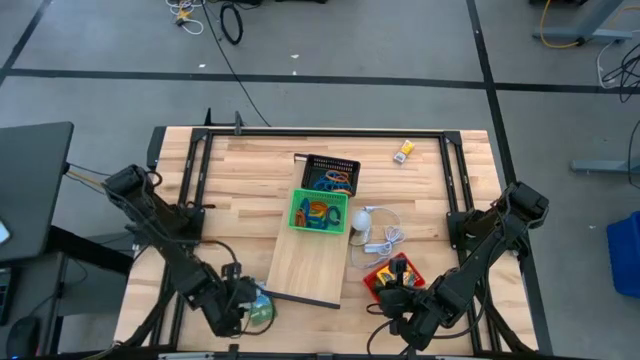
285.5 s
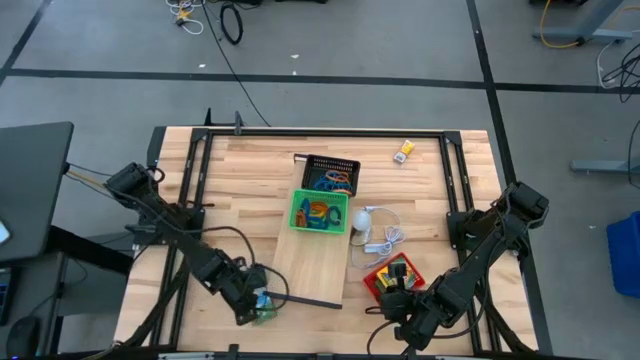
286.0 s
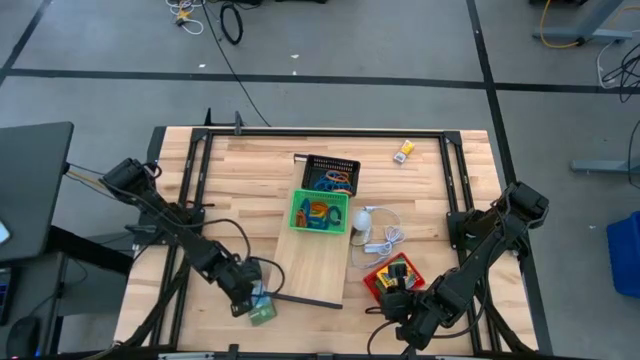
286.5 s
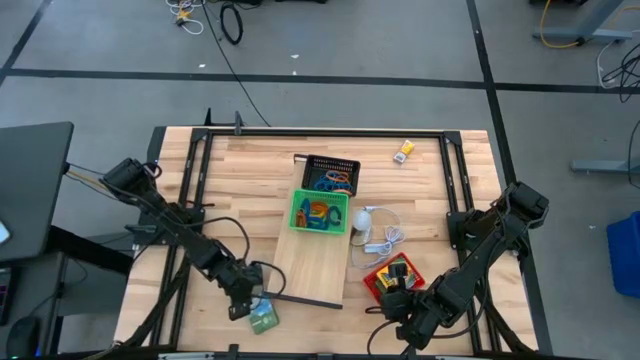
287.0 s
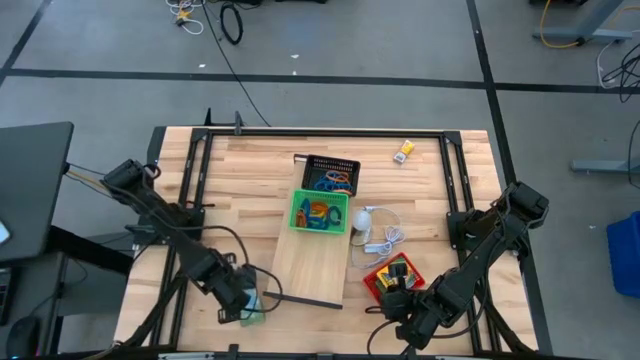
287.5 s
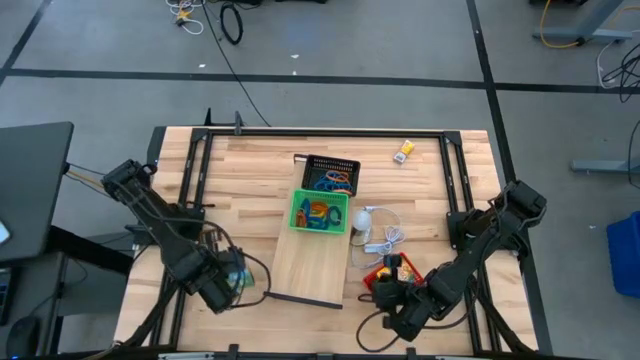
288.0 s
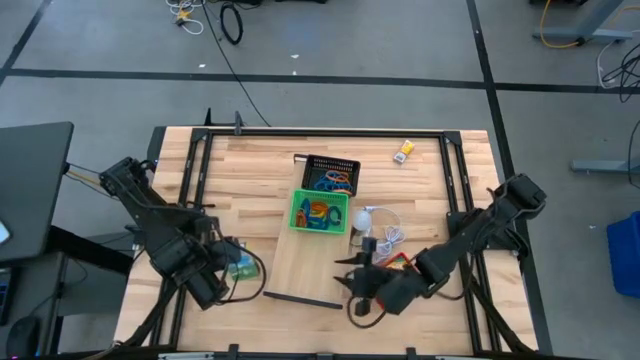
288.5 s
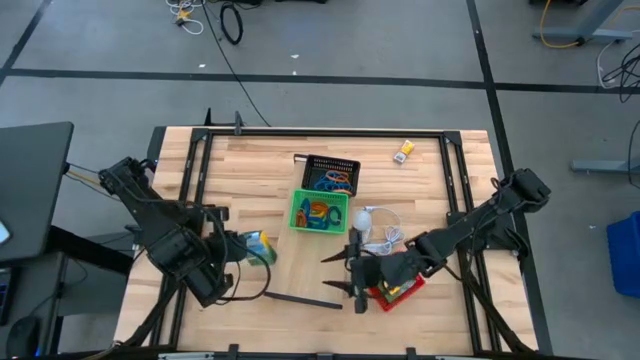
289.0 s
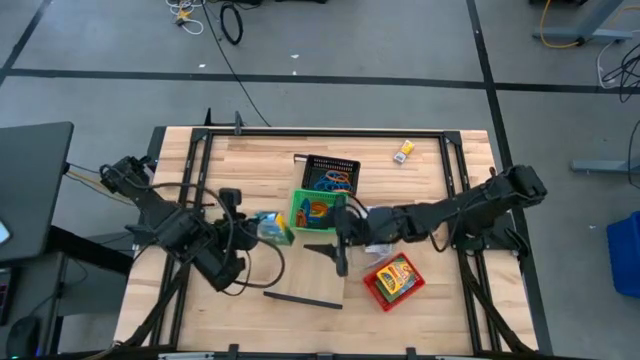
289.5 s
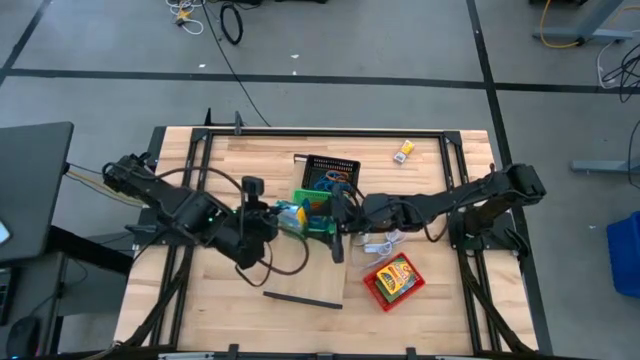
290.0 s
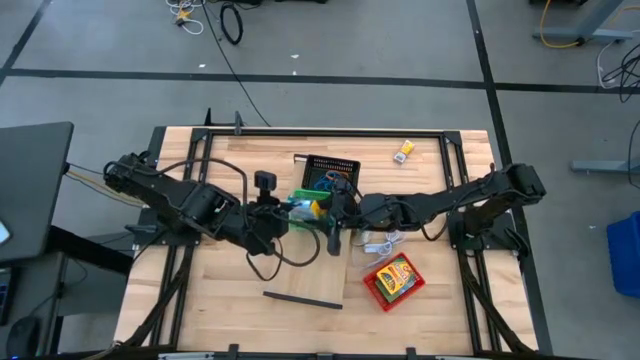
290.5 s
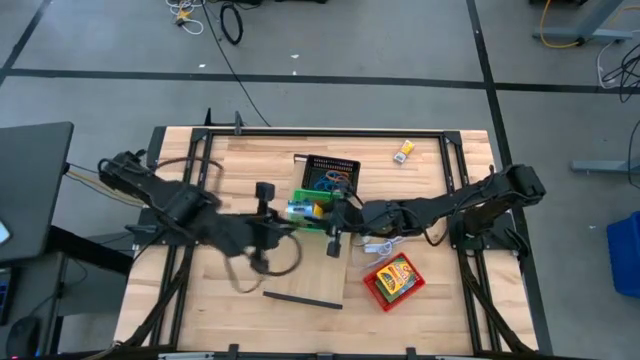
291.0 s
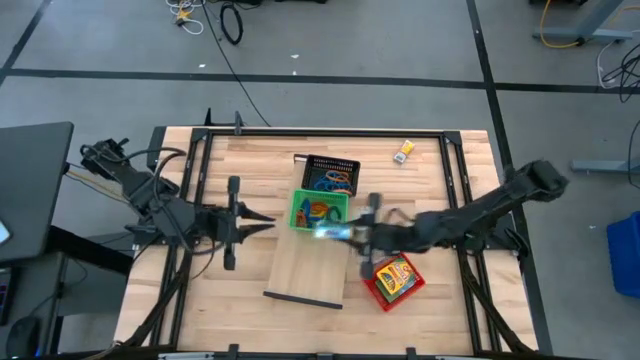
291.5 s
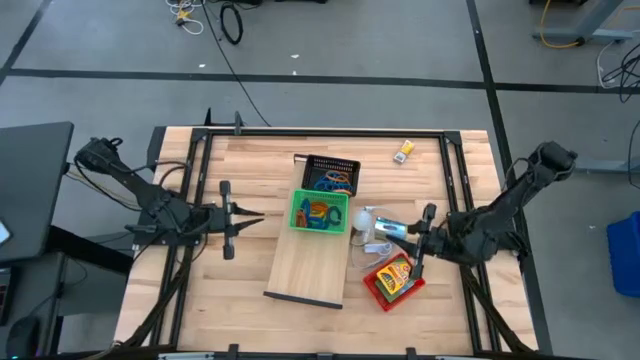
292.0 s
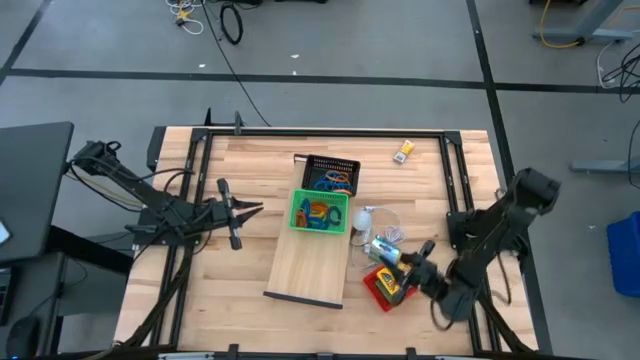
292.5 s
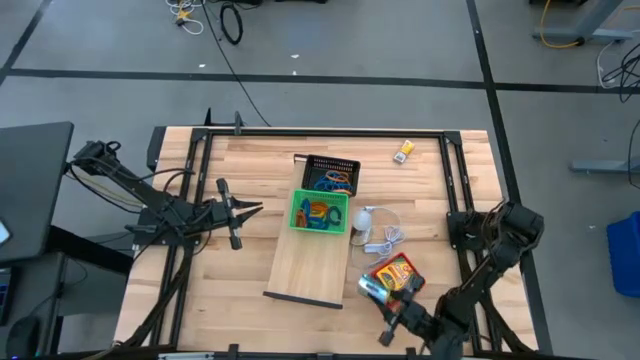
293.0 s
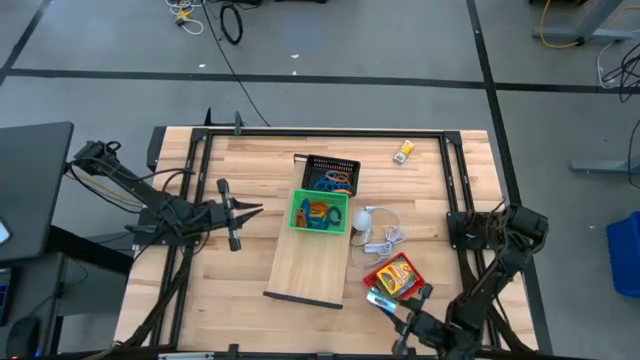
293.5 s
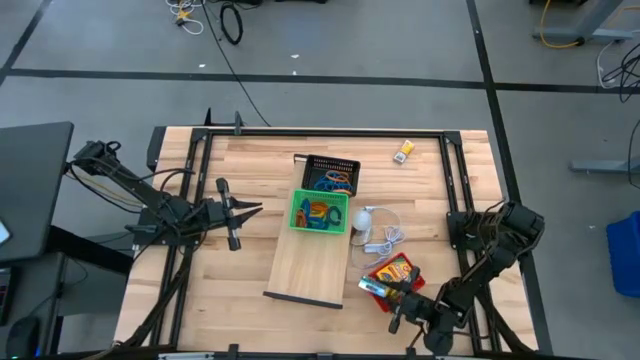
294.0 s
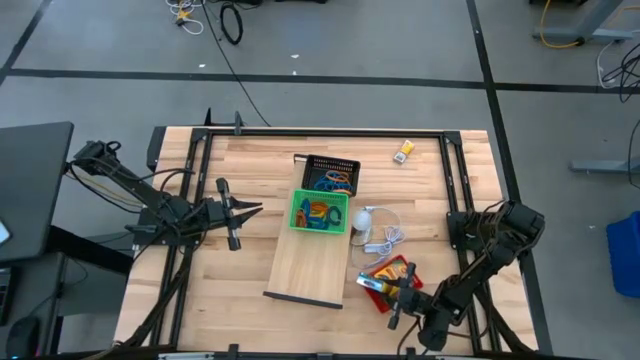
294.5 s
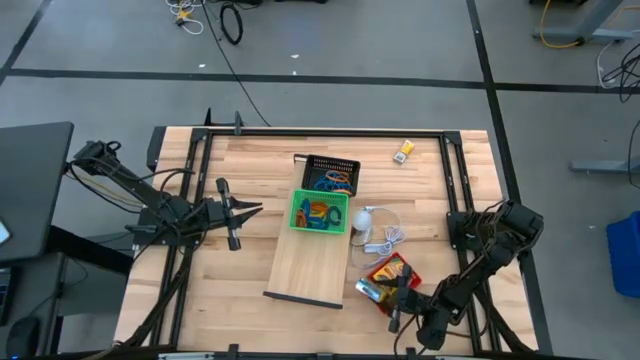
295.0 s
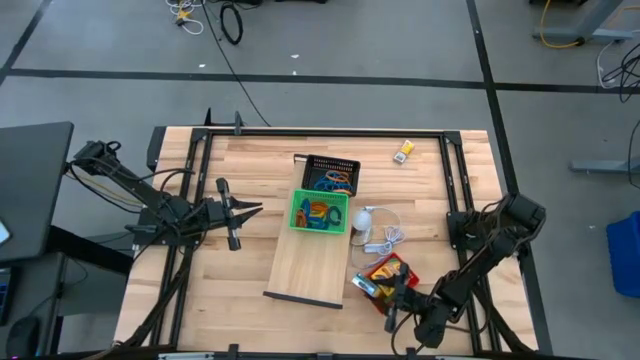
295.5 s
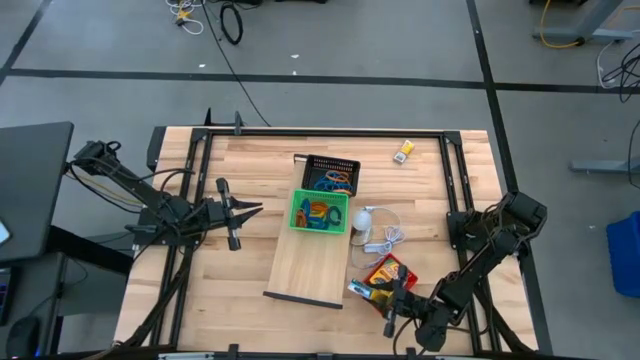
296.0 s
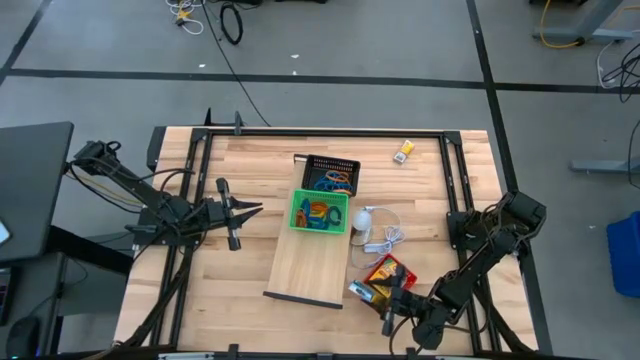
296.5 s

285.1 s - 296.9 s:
Task: Pick & Place Office Desk Supplies
Put the box of crayon into the red bin

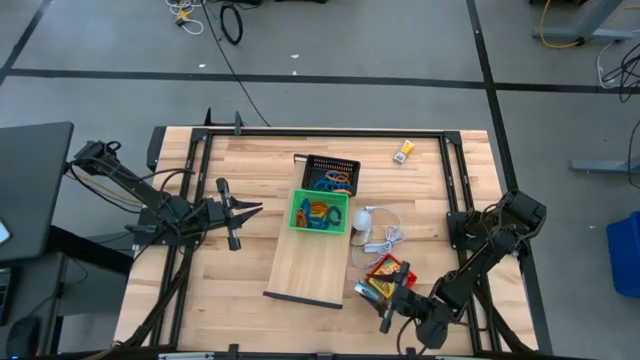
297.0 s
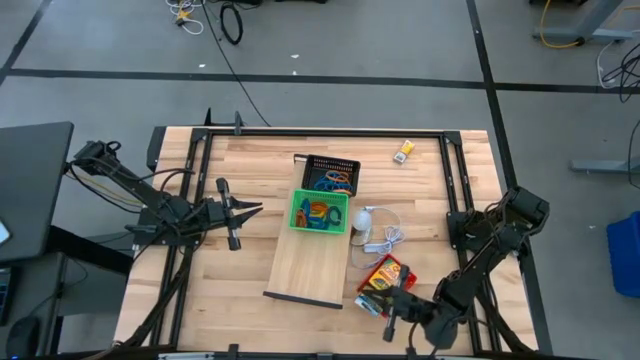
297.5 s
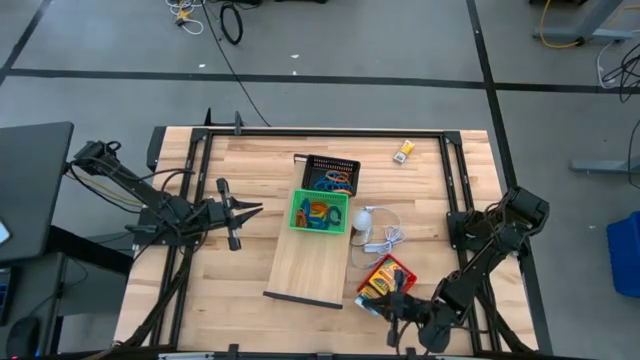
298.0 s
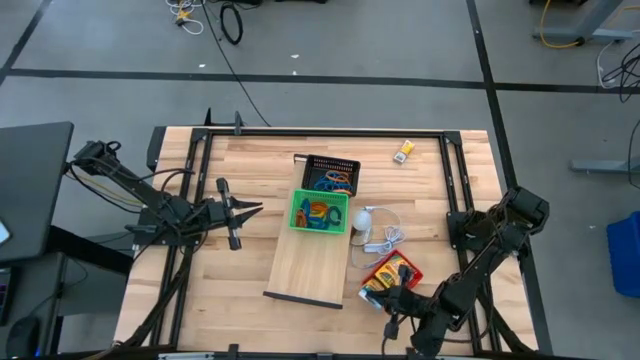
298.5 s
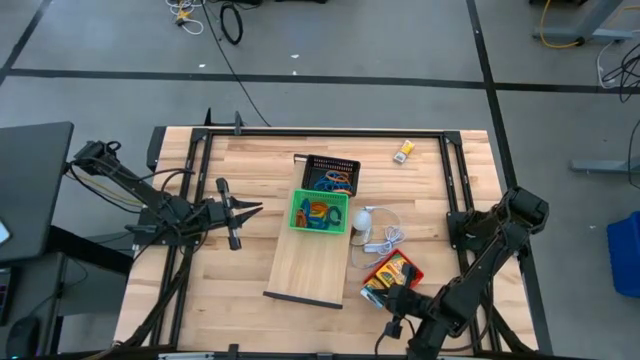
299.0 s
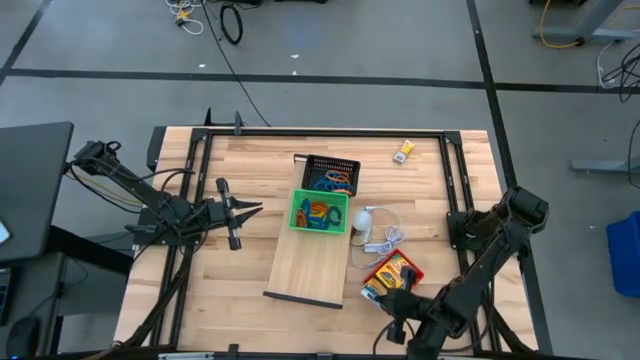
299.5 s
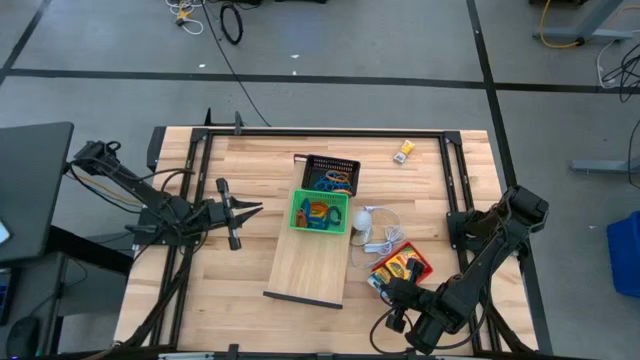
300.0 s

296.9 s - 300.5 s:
Adjust the red bin

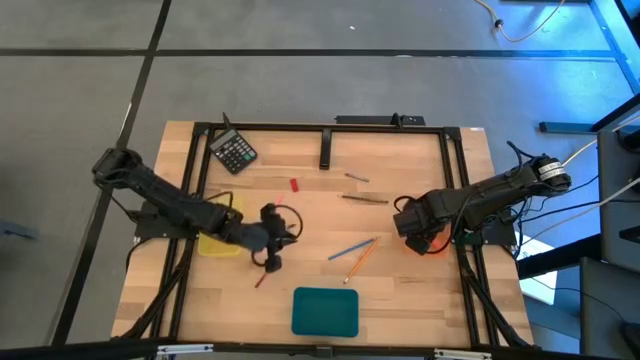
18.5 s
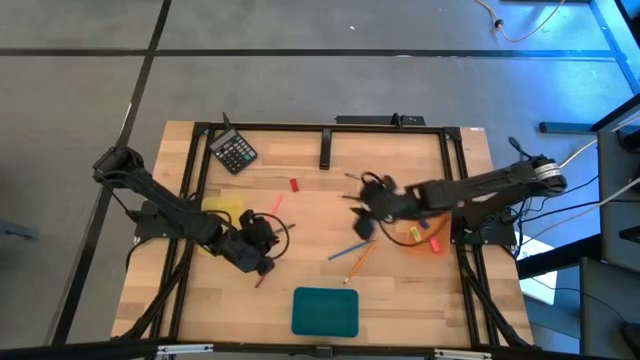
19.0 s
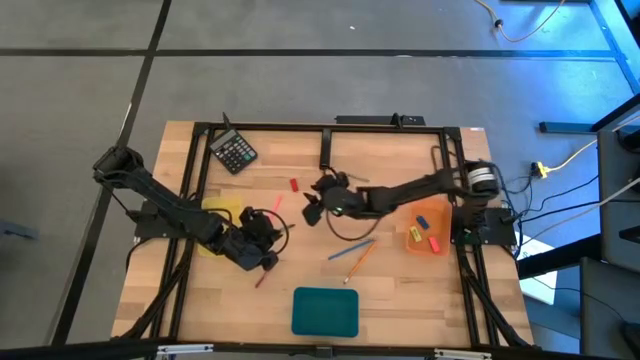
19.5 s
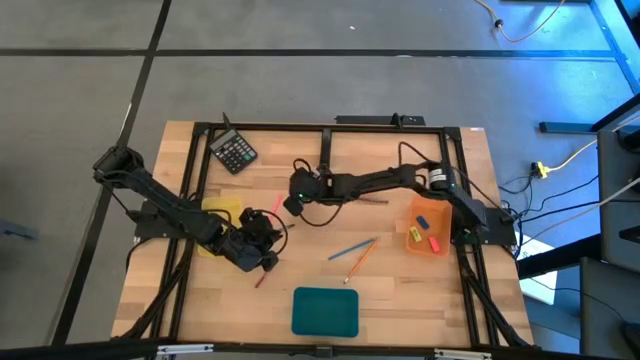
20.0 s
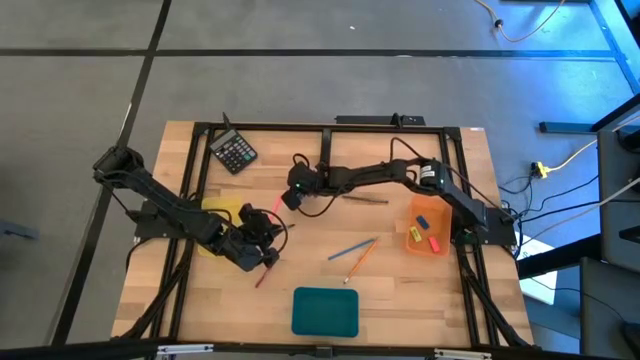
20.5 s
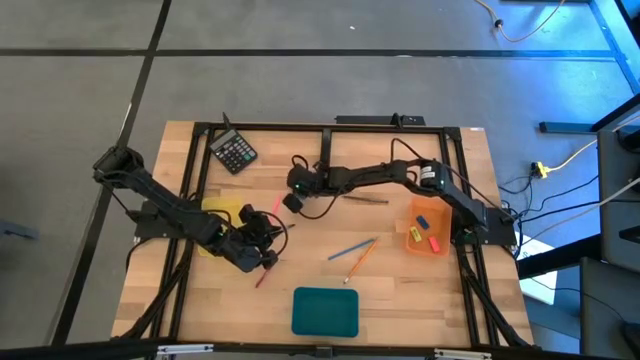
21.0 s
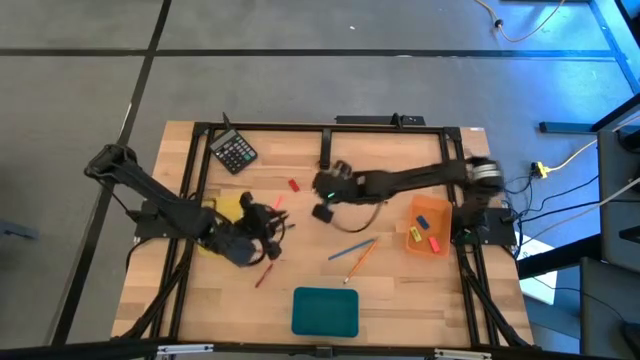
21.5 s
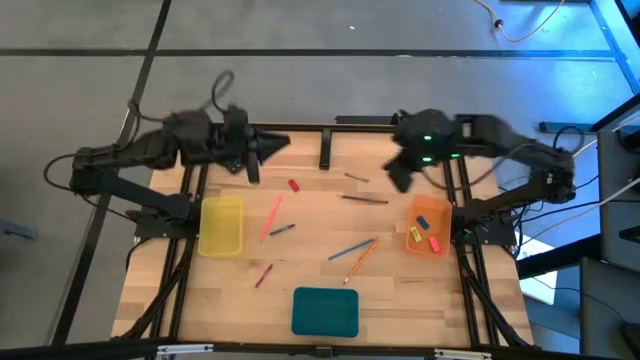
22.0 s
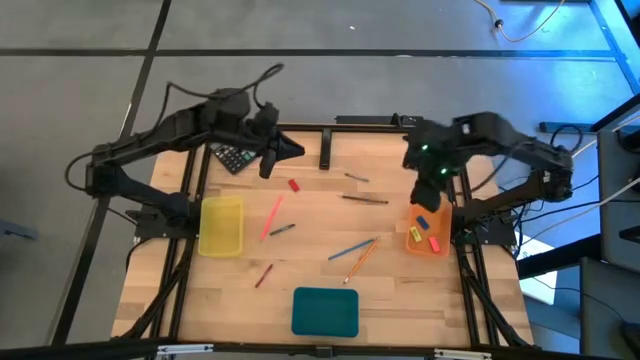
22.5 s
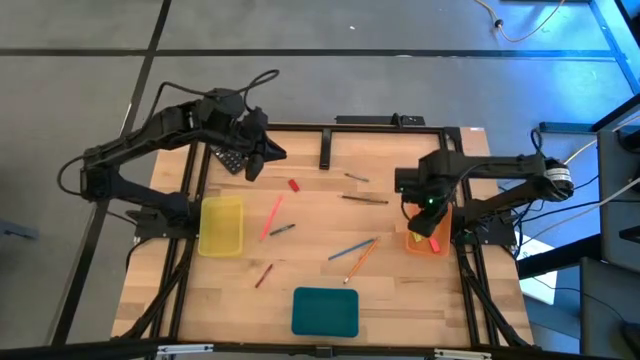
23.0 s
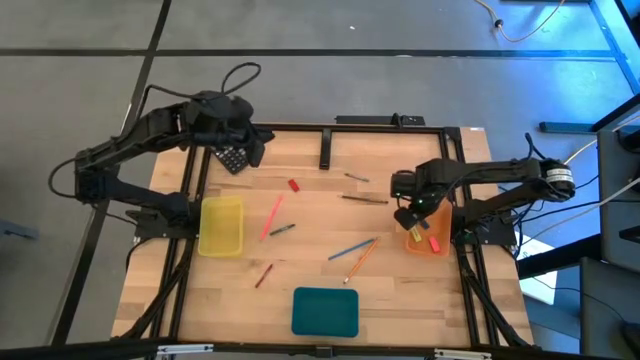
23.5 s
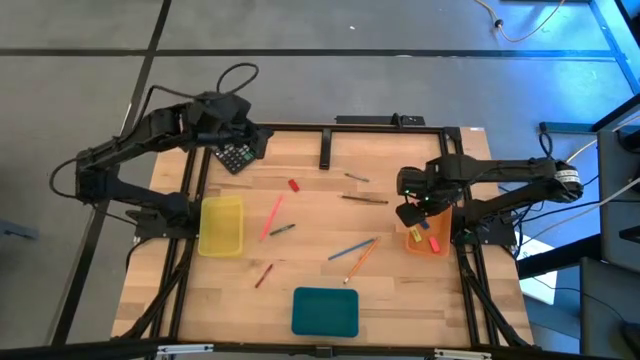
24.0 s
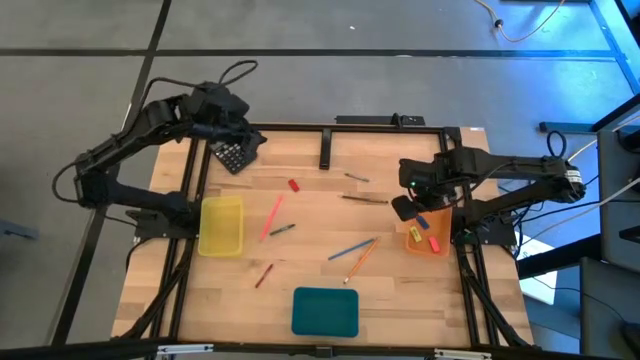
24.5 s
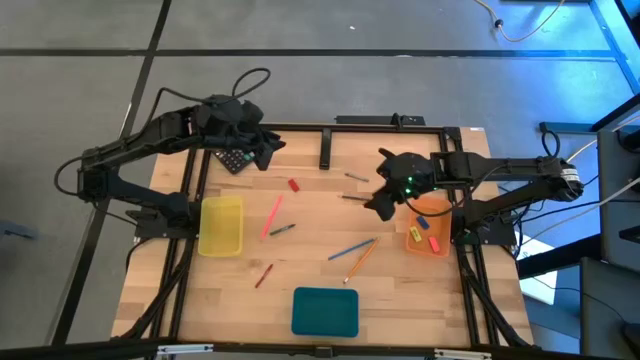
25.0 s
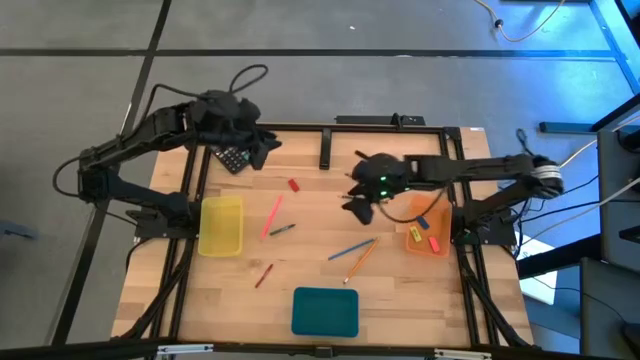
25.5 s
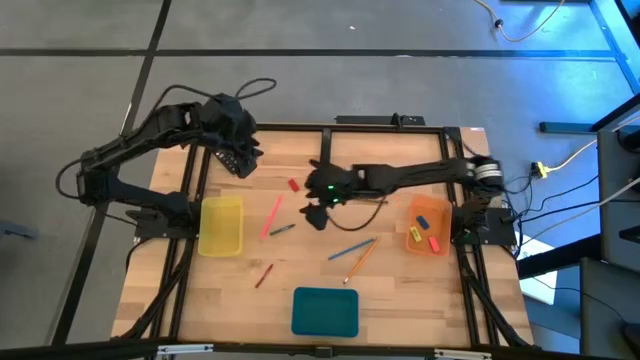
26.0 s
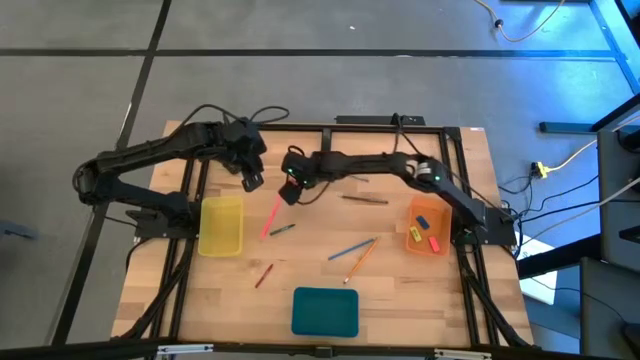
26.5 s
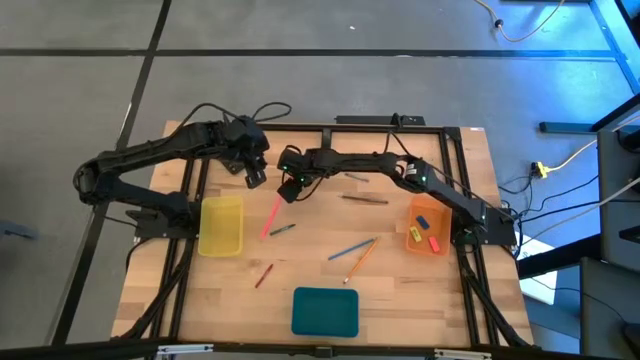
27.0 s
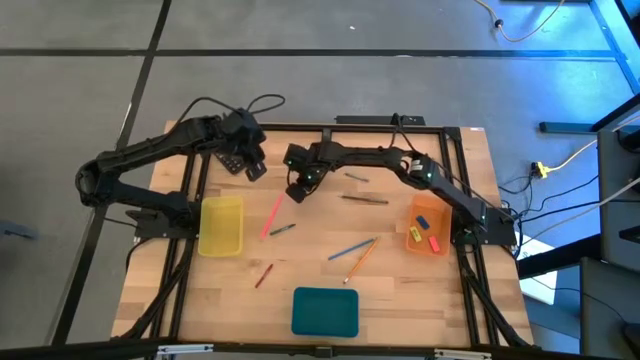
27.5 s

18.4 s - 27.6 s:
Task: Sort crayons/erasers/pens/pencils in bins
Put the red eraser into the orange bin
